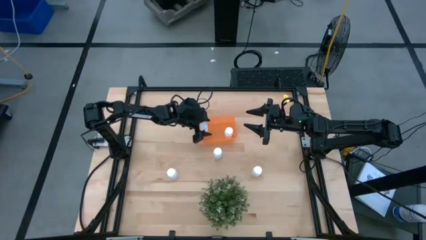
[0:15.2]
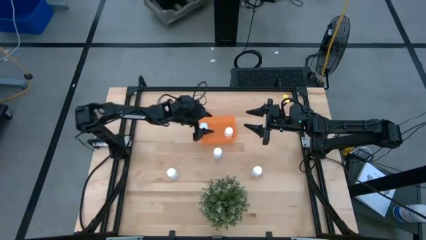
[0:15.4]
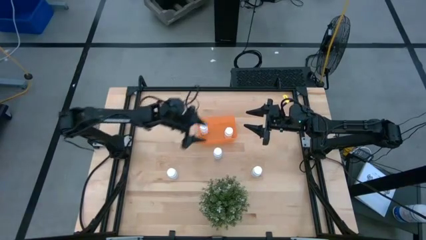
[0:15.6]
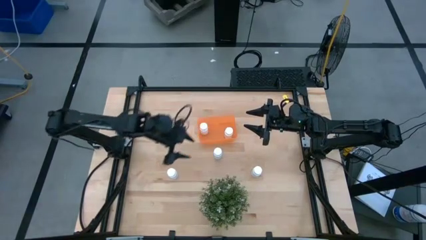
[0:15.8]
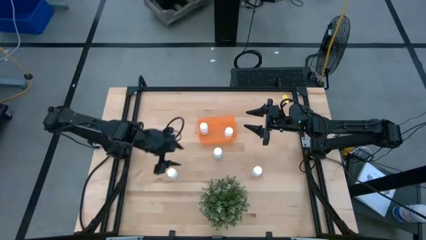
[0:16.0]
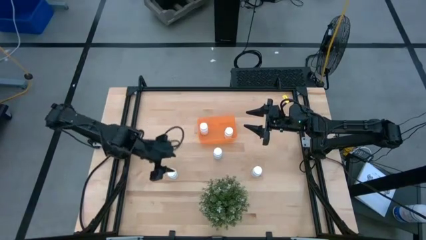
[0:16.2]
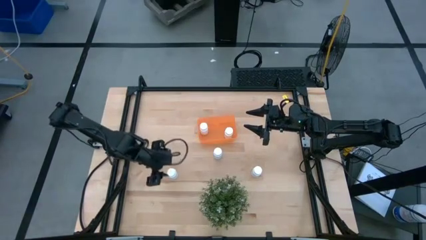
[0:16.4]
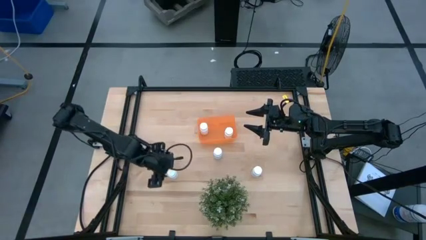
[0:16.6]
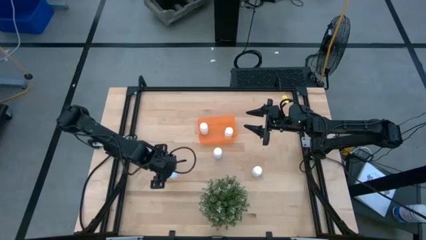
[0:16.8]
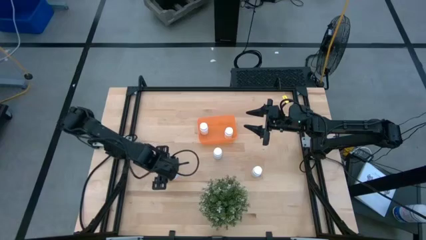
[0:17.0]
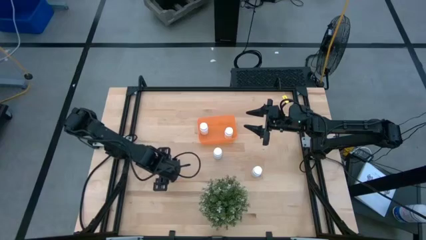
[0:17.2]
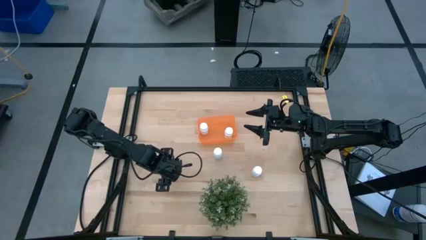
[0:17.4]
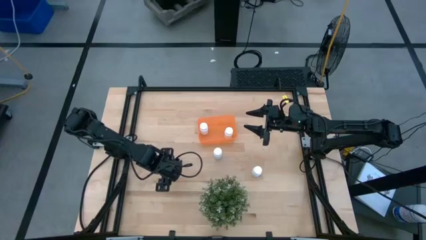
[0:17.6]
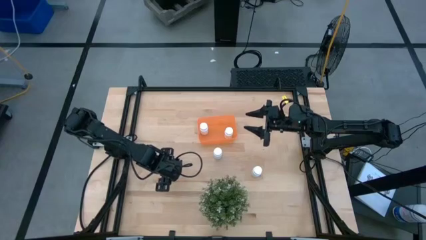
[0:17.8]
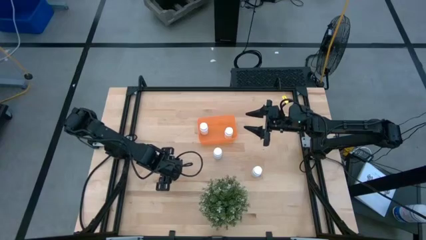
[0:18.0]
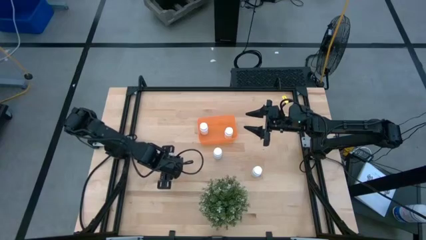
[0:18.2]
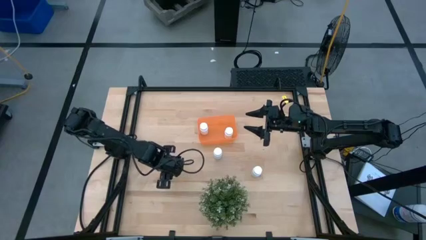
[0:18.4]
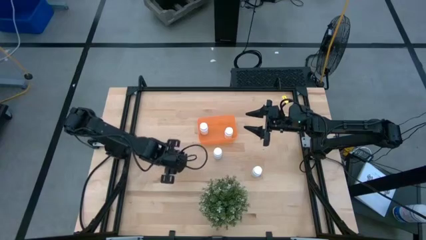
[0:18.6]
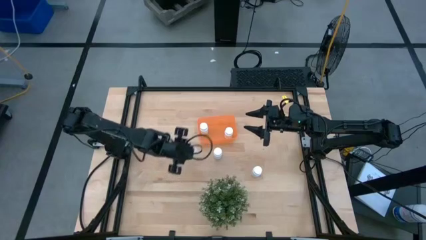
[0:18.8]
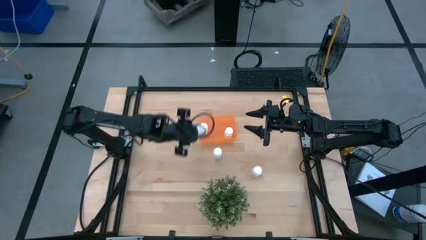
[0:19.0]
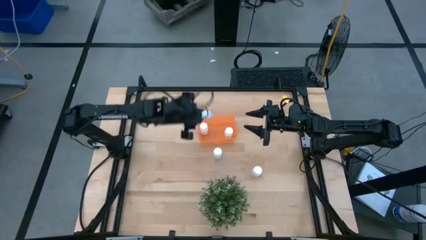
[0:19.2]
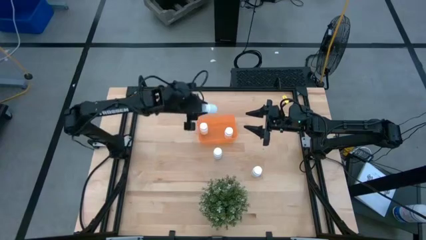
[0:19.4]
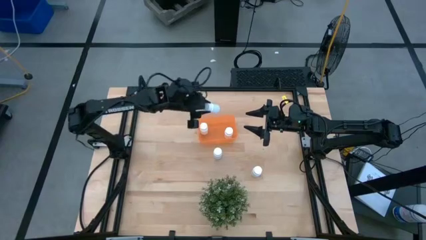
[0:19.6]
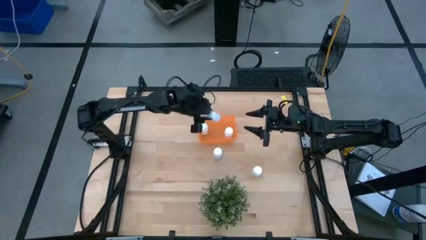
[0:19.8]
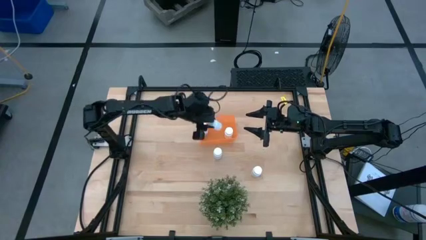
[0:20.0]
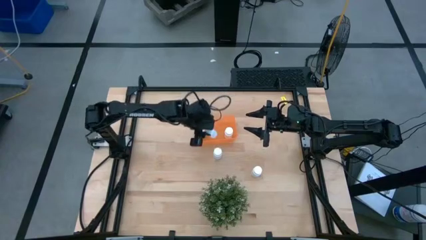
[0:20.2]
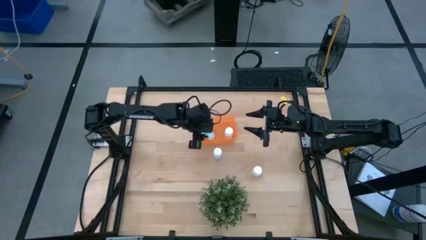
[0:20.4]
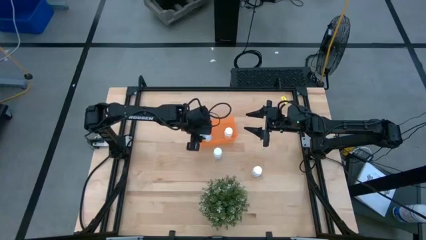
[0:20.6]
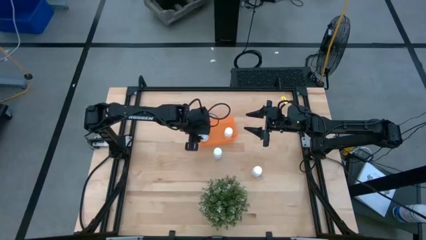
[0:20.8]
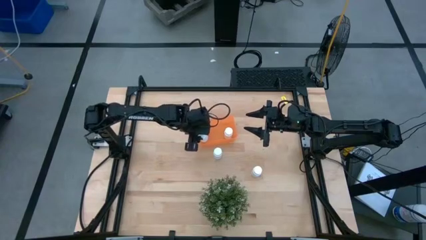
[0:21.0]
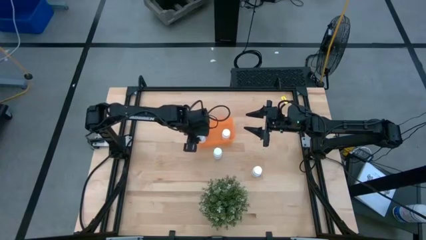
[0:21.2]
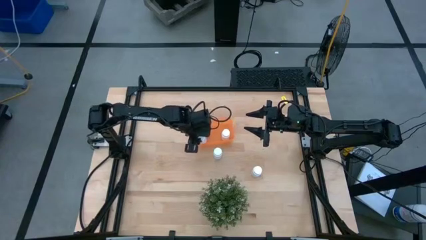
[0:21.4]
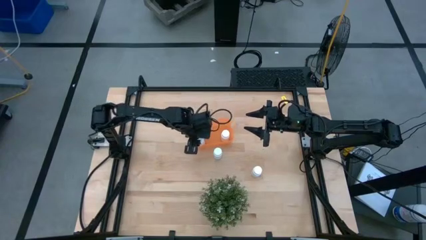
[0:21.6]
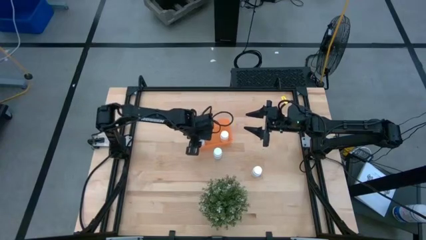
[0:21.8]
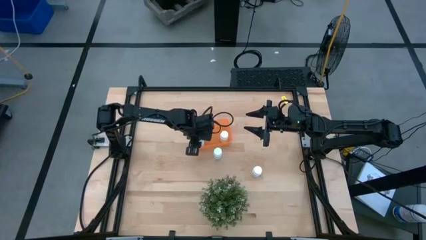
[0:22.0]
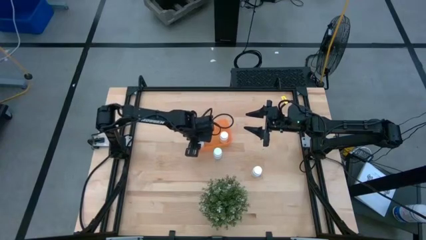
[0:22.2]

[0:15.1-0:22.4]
Task: Pick and place pill bottles into a basket
Put the white pill bottle into the orange bin

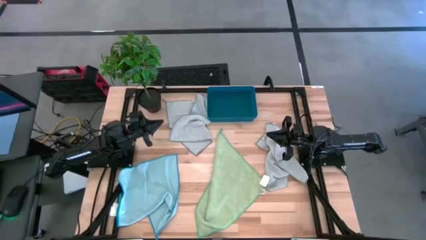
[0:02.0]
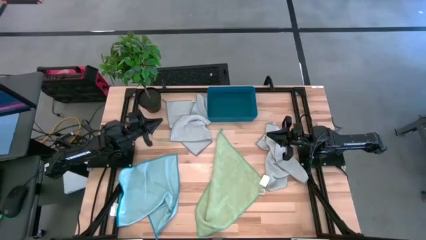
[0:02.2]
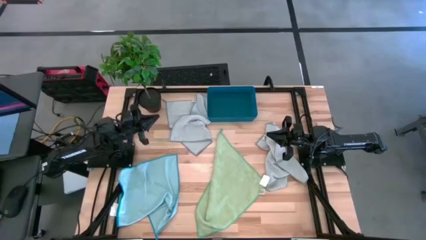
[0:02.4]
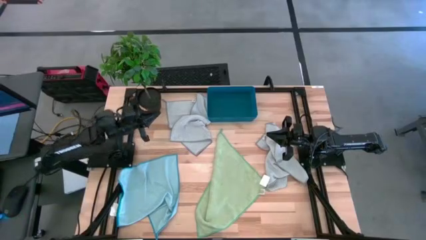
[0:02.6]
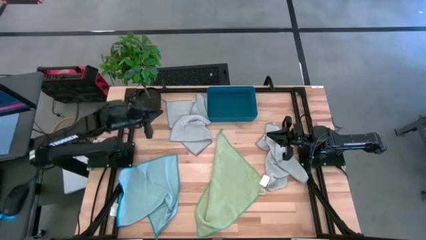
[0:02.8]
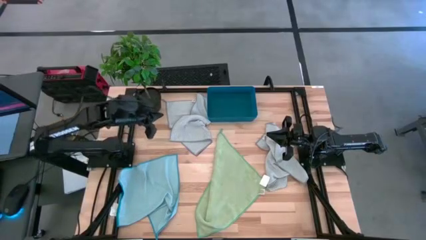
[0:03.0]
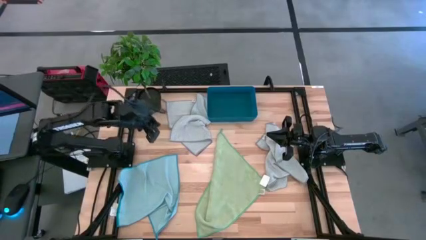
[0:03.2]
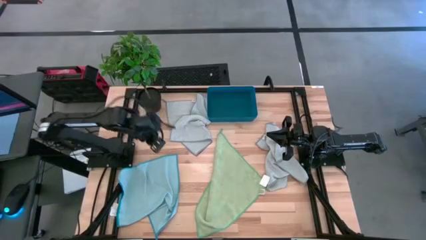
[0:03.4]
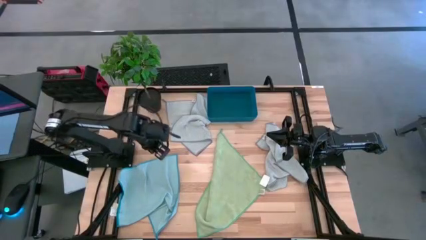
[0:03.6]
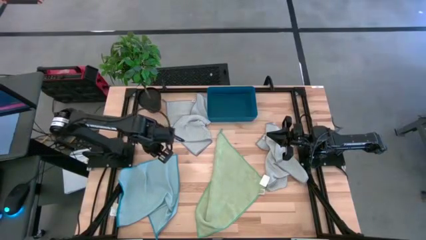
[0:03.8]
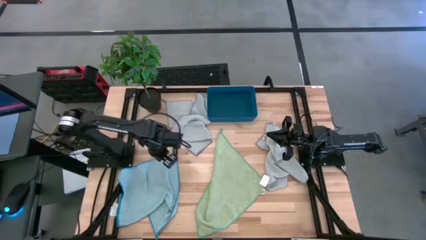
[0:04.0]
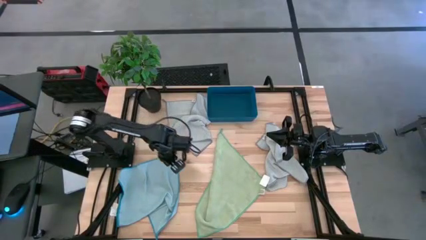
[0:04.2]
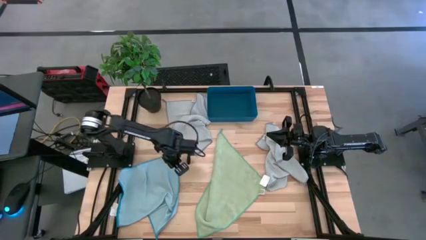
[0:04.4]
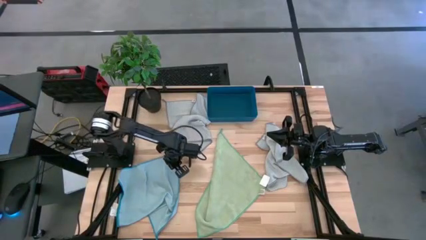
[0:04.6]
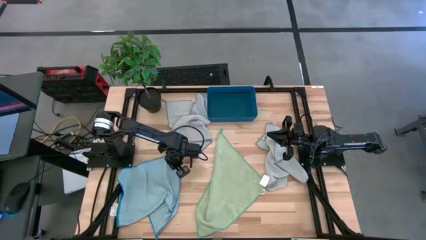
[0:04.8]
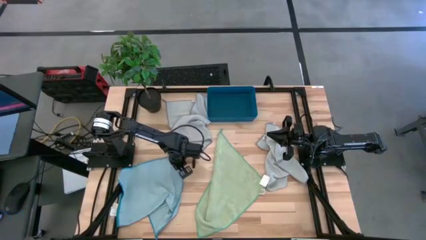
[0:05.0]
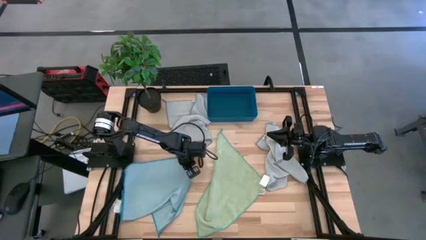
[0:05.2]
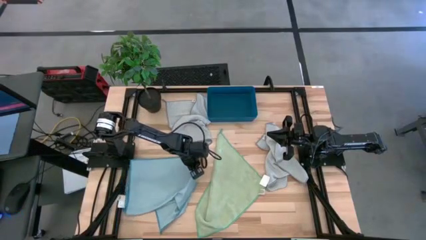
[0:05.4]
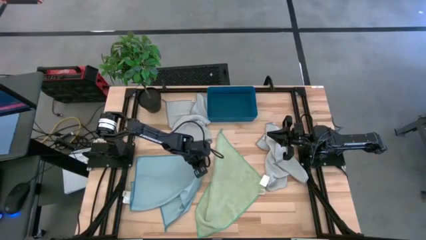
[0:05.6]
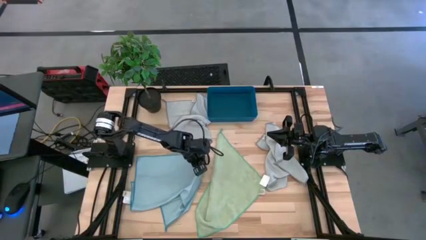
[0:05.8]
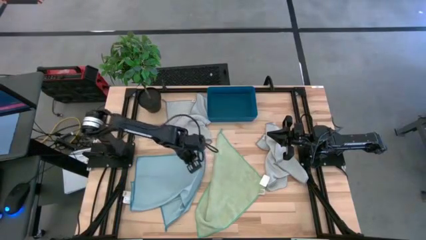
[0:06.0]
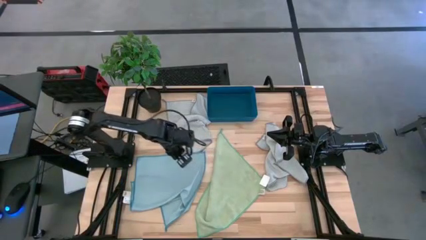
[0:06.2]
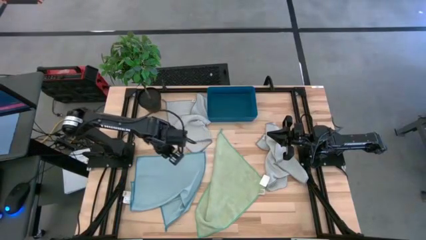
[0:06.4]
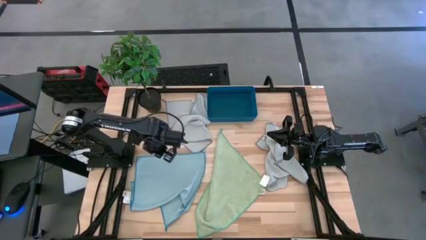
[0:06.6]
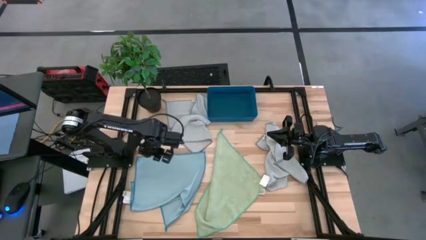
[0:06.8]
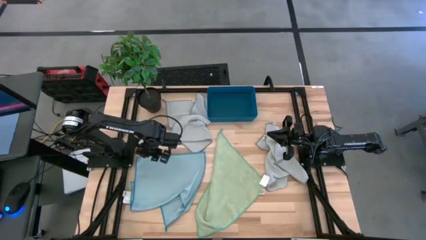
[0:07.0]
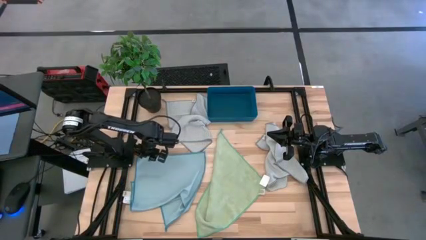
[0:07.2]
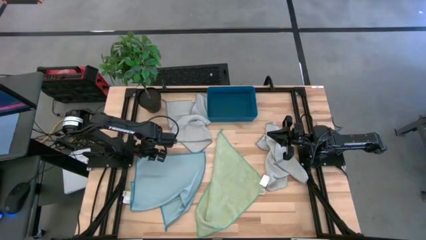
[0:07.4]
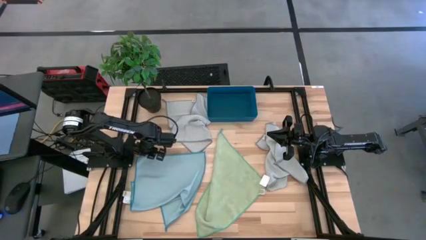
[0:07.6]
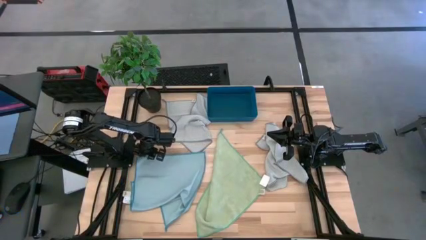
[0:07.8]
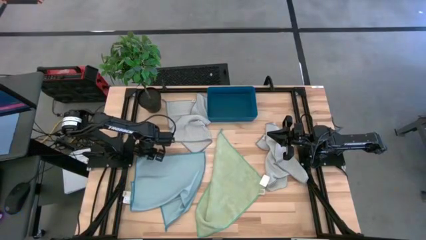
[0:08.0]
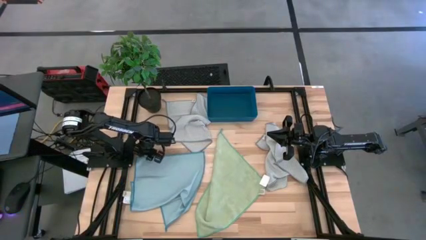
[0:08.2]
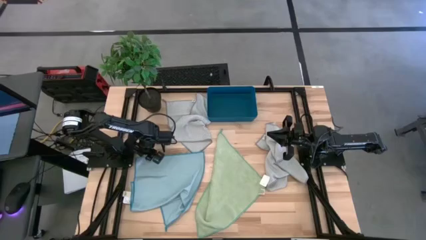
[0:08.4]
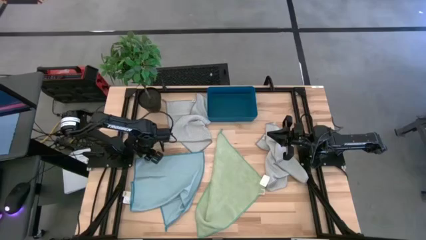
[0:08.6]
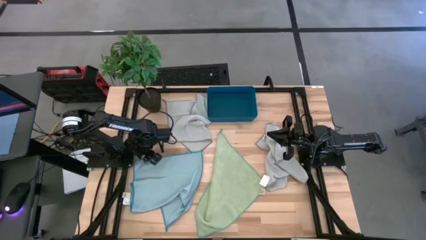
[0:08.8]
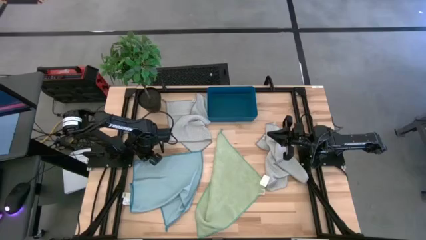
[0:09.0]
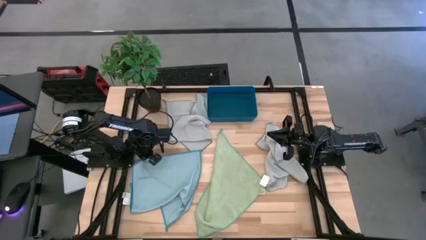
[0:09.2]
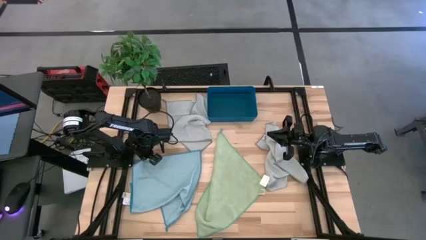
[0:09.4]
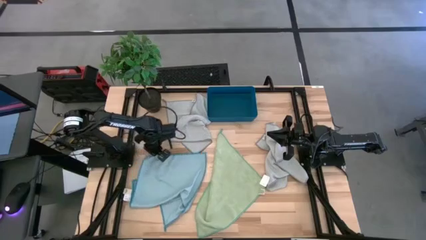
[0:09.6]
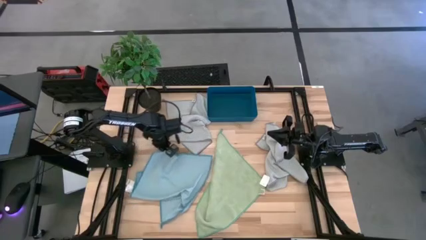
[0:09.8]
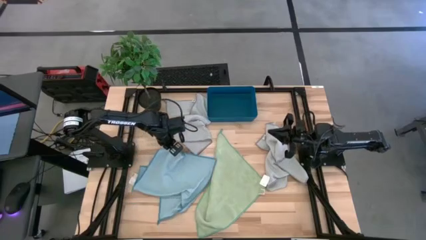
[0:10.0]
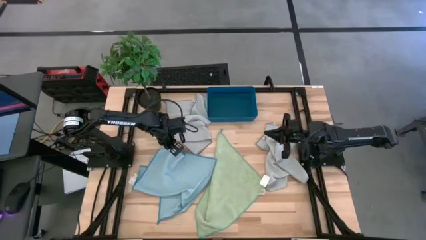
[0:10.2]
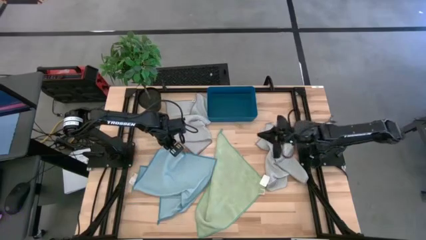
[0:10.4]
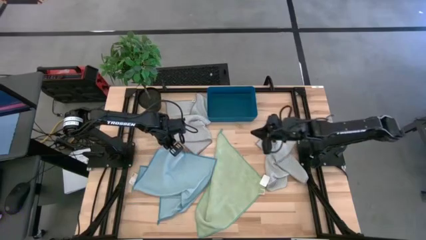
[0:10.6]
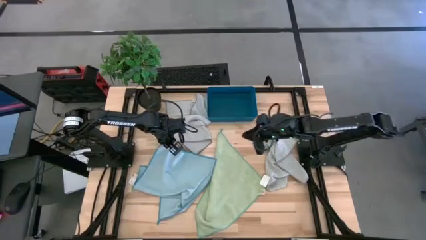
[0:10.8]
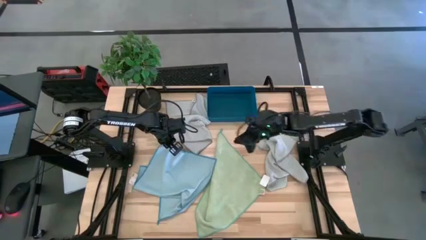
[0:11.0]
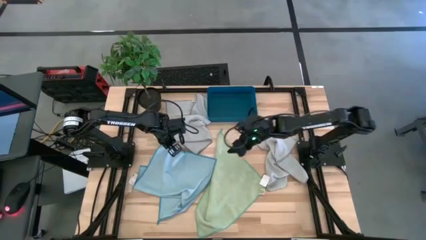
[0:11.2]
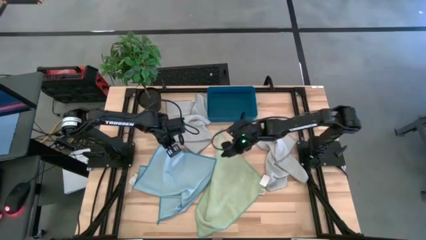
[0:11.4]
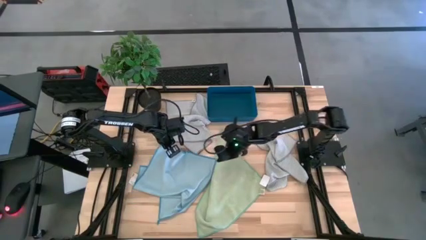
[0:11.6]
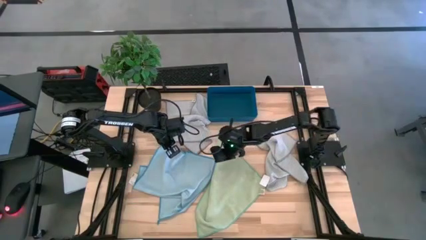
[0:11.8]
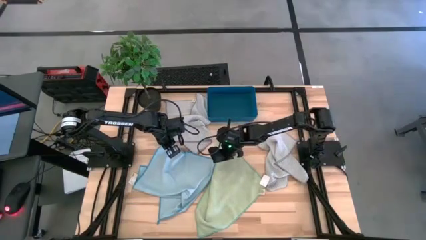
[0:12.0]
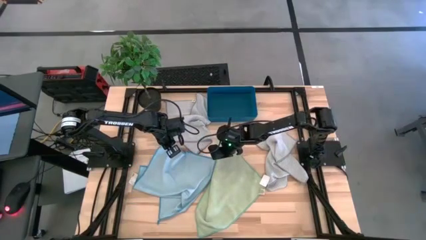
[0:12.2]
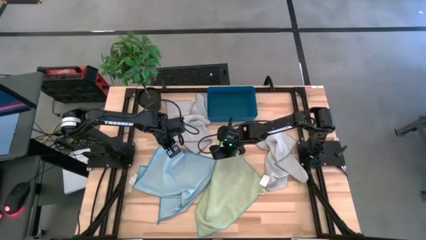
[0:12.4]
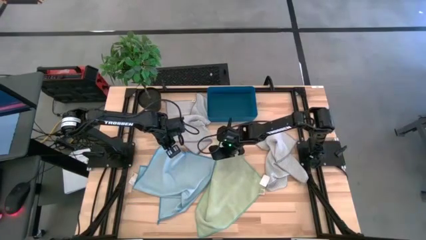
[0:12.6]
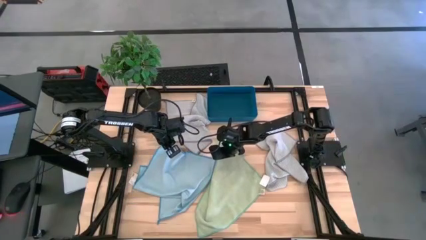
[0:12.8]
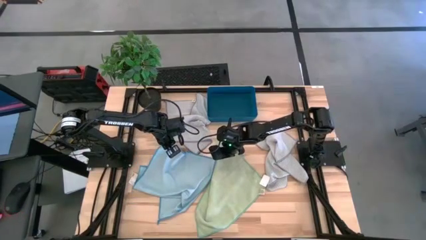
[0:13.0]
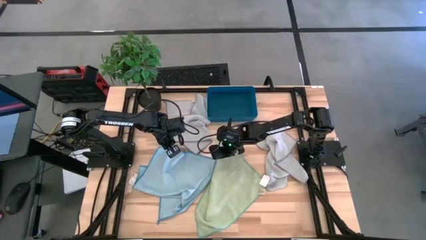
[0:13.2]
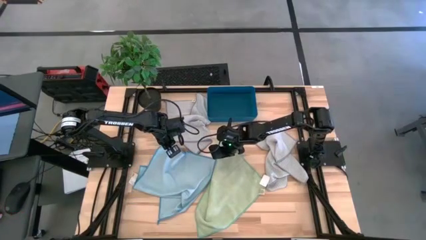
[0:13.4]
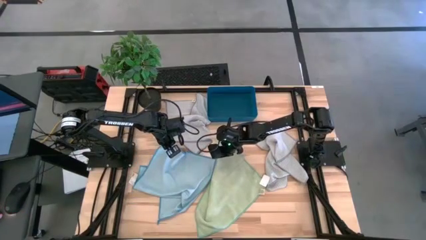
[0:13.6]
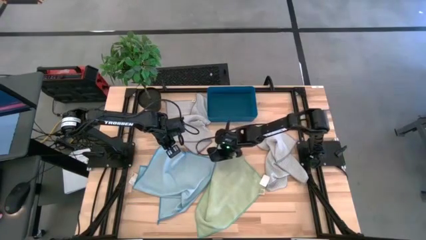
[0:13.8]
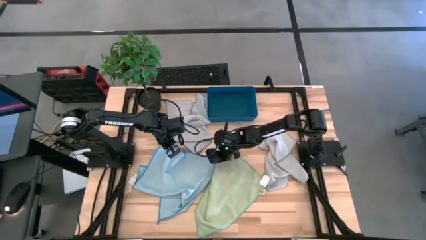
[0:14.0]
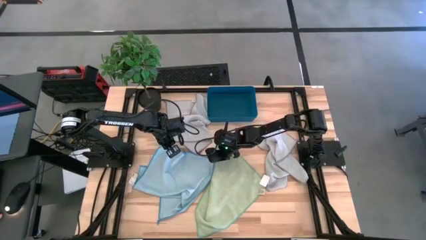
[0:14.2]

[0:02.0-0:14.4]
Task: Fold microfiber towels
Fold the blue towel
